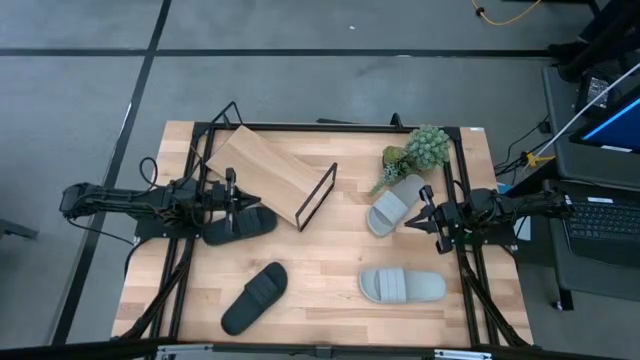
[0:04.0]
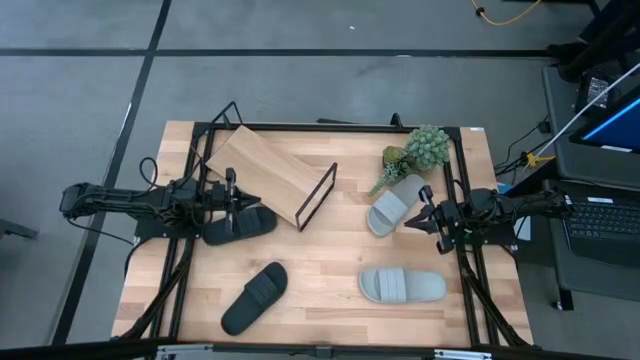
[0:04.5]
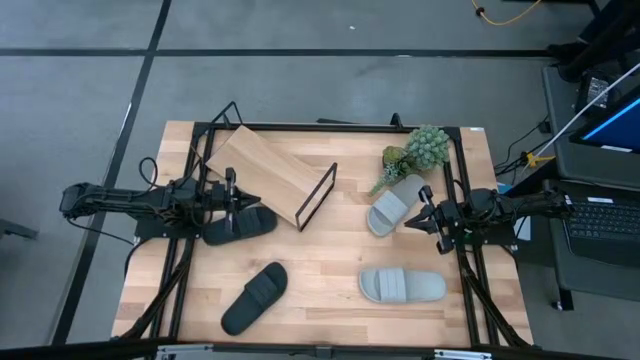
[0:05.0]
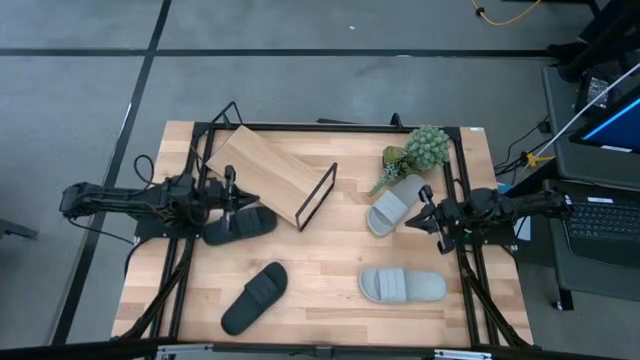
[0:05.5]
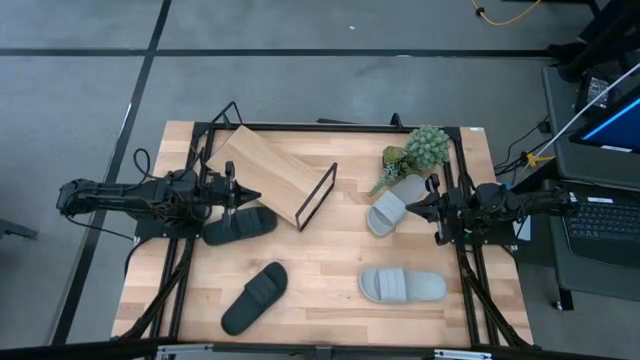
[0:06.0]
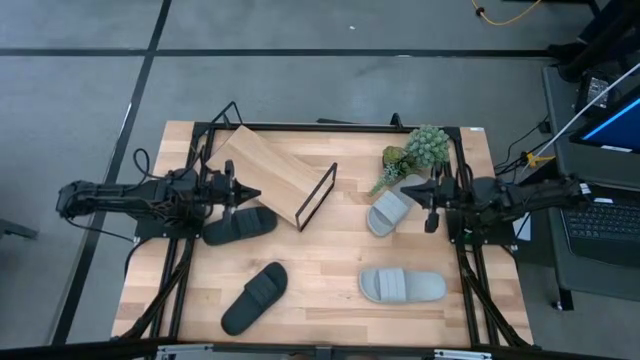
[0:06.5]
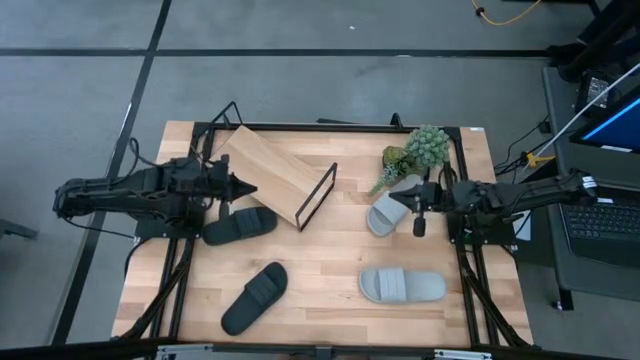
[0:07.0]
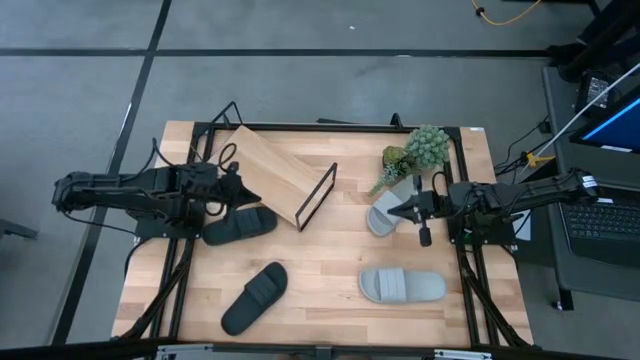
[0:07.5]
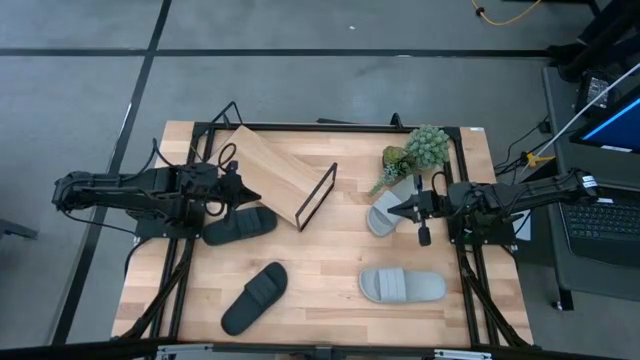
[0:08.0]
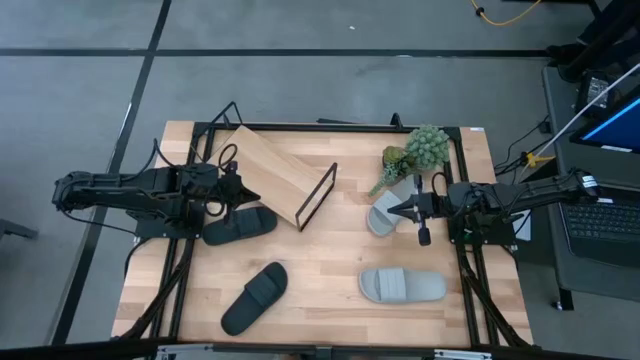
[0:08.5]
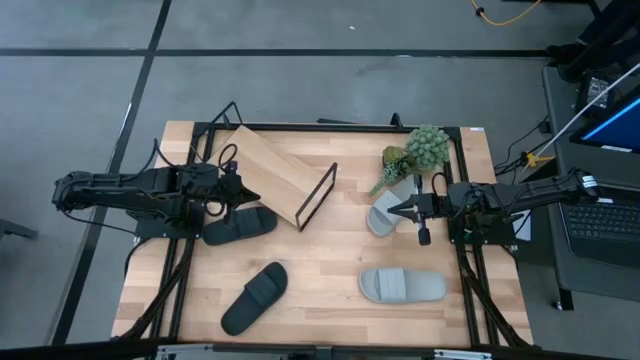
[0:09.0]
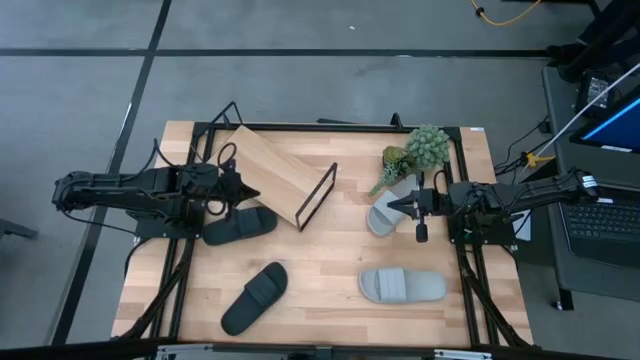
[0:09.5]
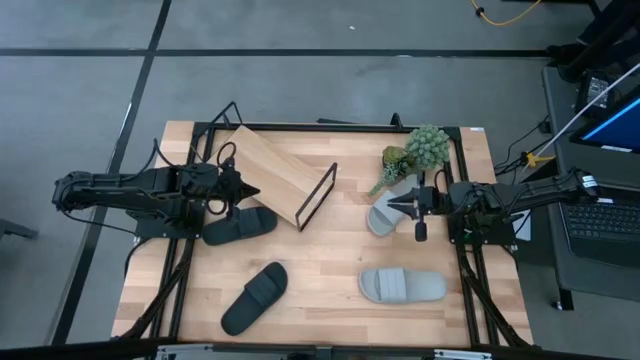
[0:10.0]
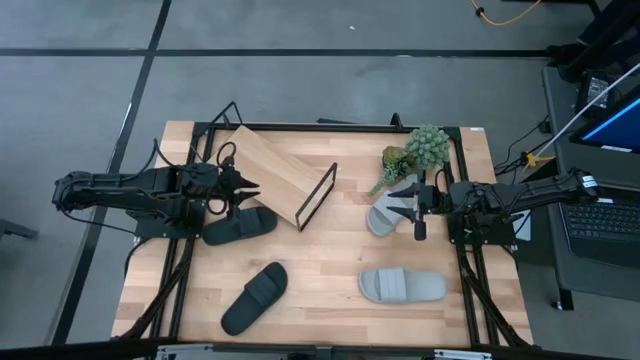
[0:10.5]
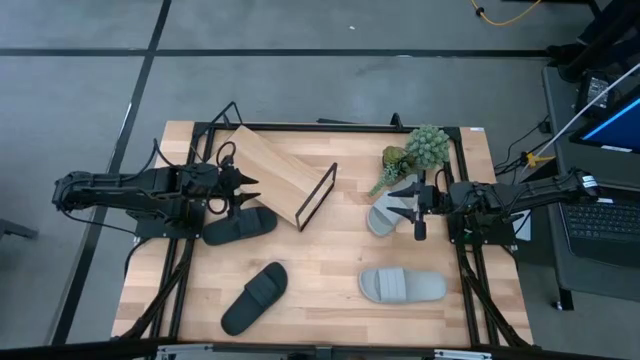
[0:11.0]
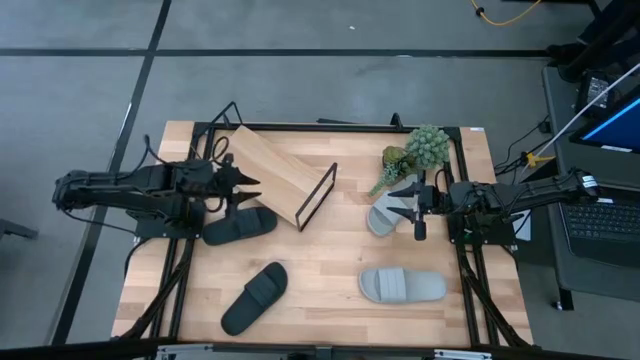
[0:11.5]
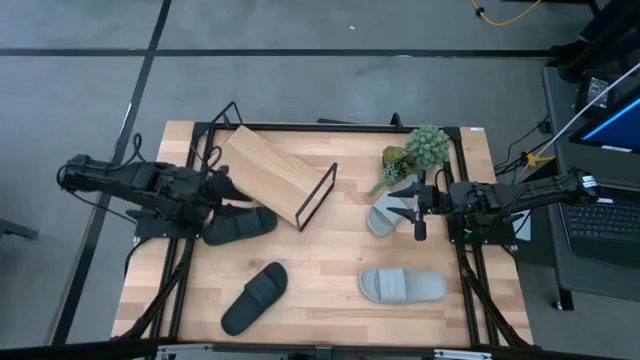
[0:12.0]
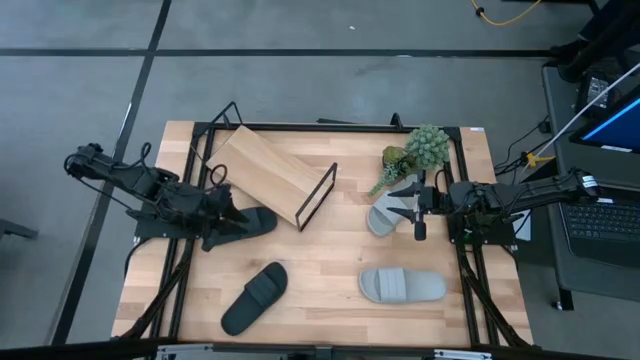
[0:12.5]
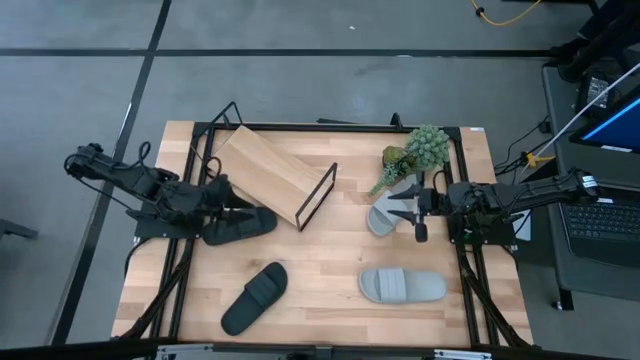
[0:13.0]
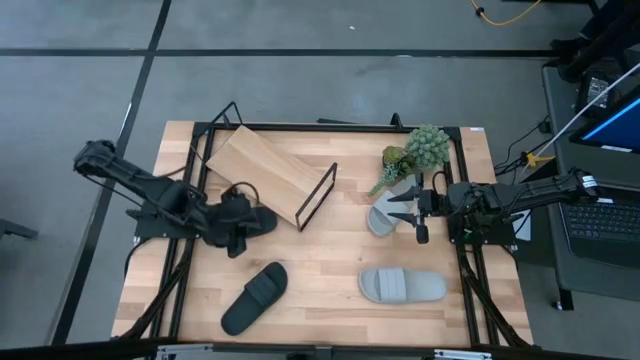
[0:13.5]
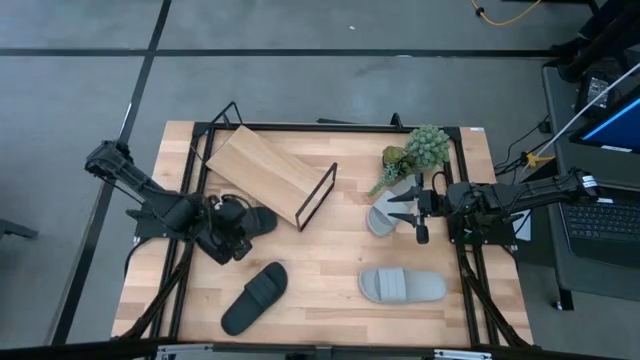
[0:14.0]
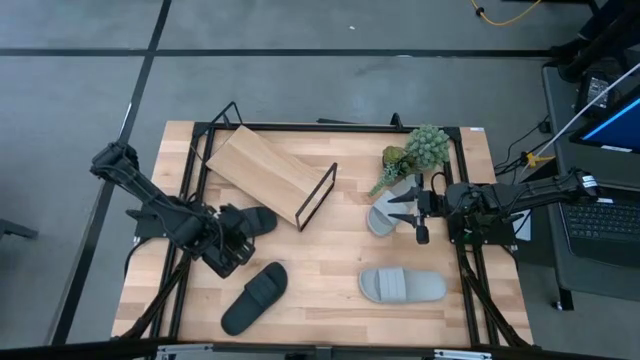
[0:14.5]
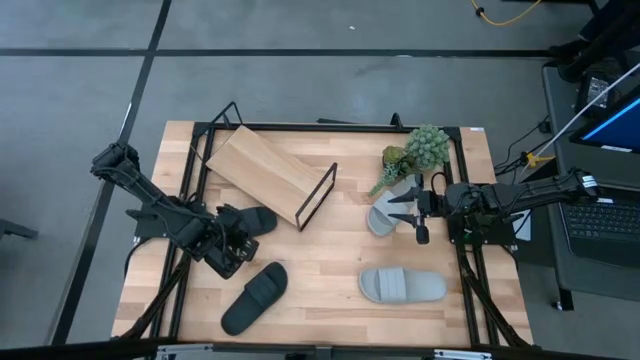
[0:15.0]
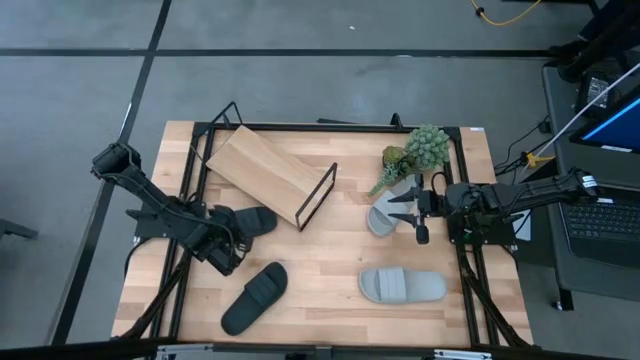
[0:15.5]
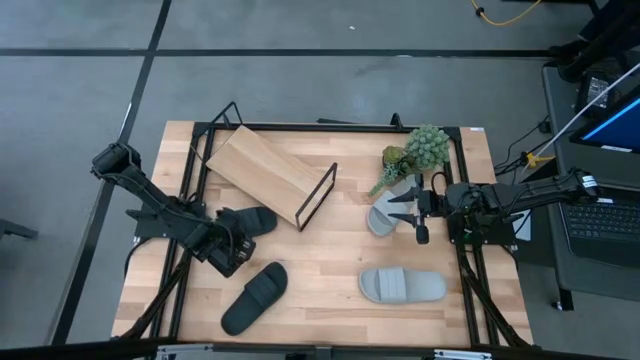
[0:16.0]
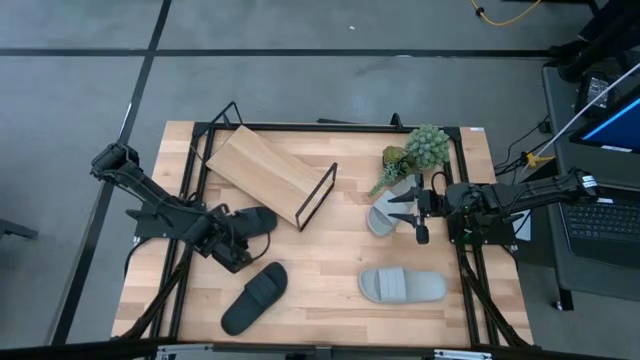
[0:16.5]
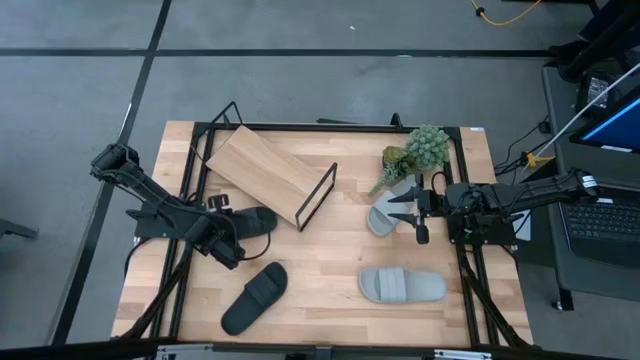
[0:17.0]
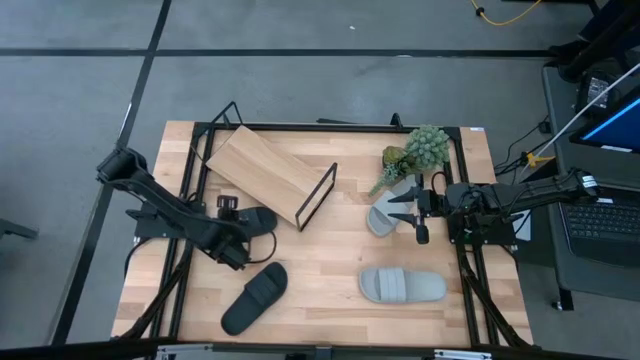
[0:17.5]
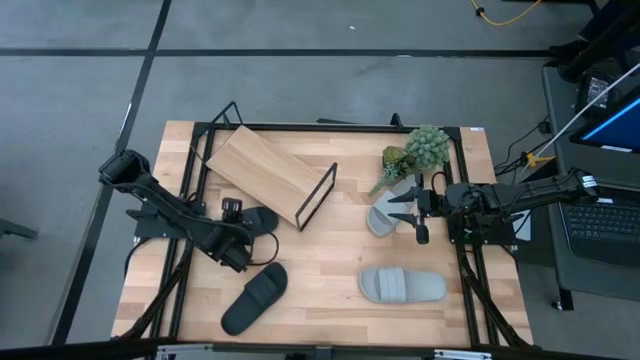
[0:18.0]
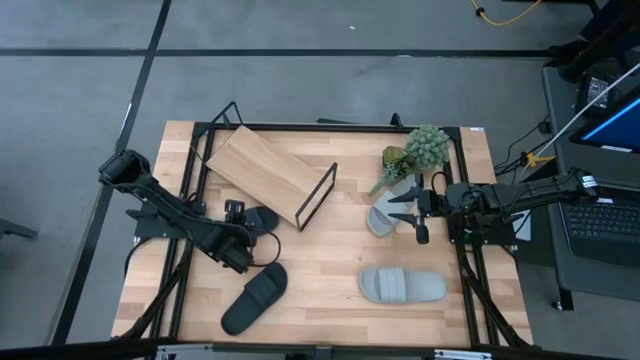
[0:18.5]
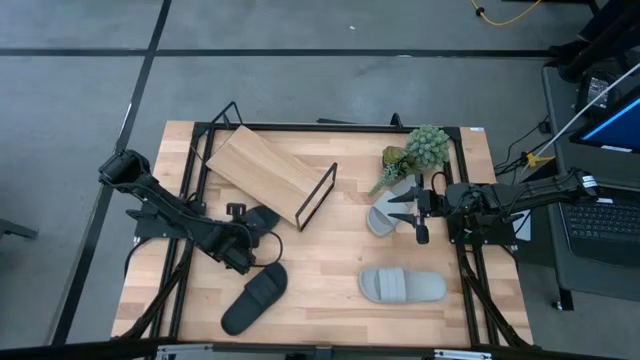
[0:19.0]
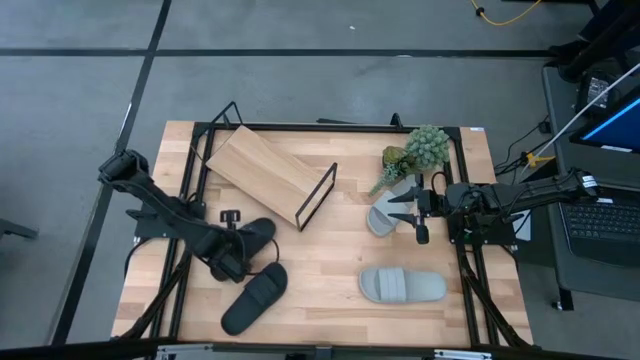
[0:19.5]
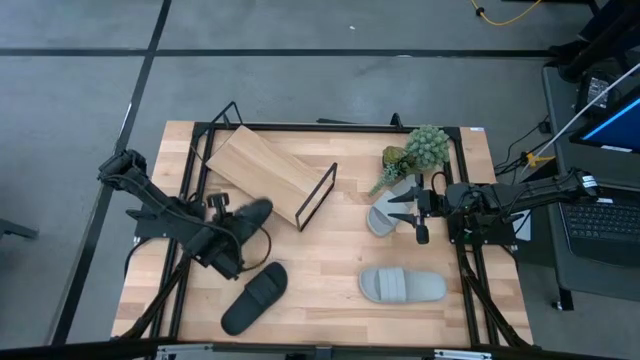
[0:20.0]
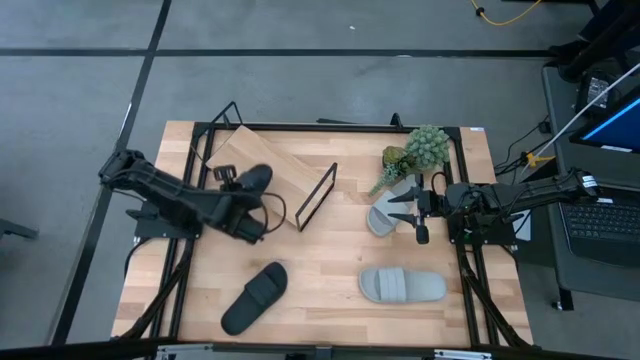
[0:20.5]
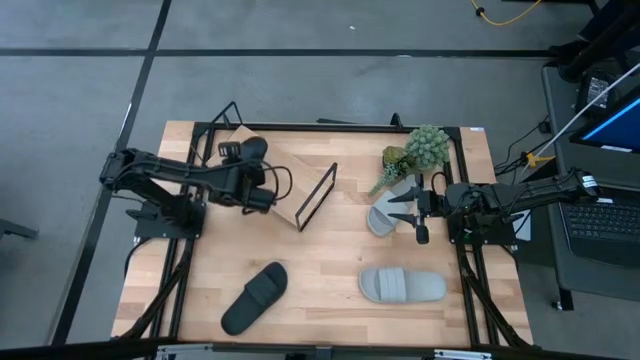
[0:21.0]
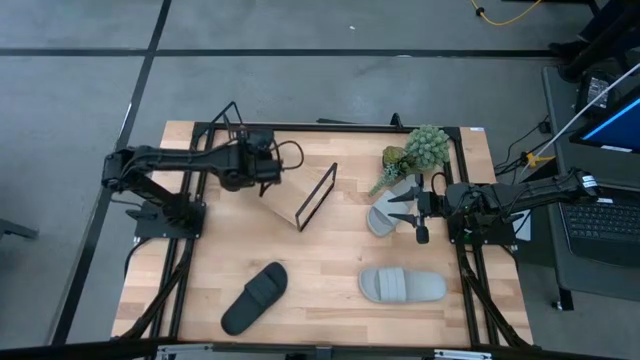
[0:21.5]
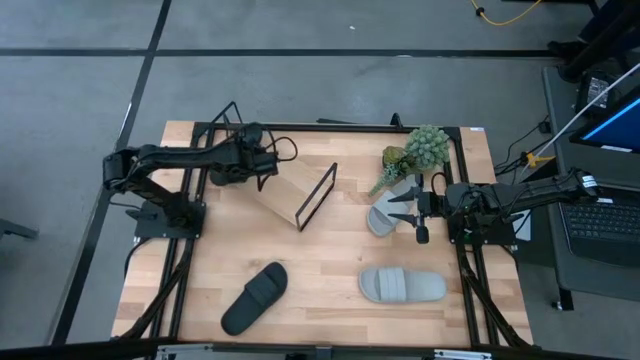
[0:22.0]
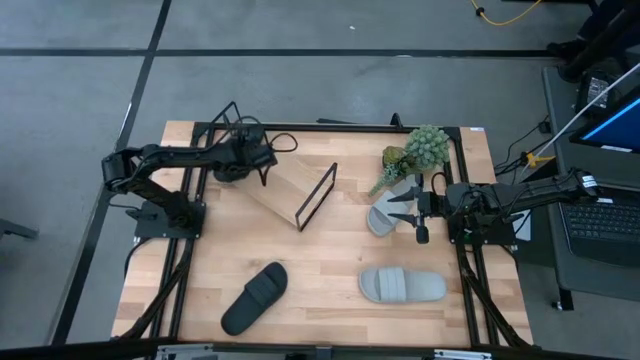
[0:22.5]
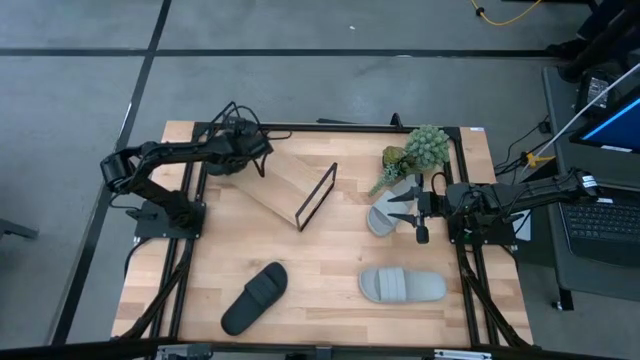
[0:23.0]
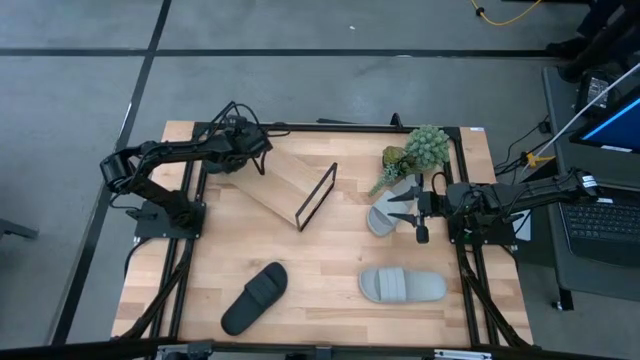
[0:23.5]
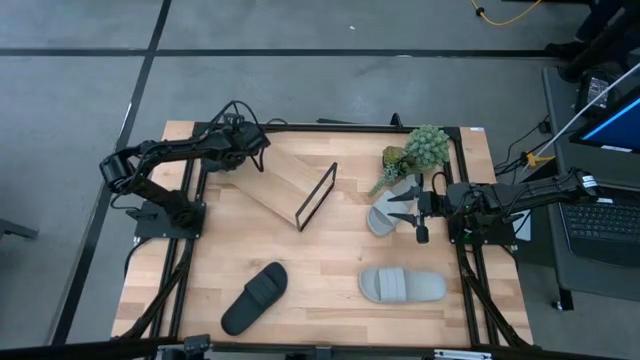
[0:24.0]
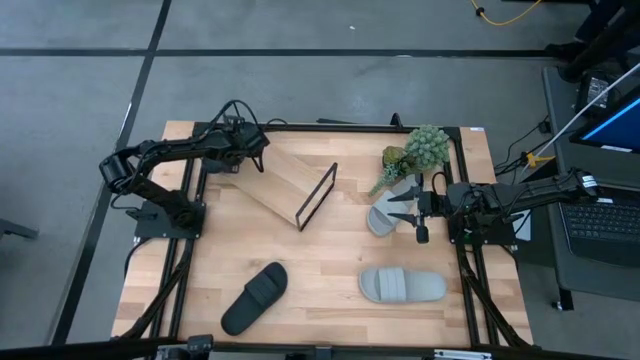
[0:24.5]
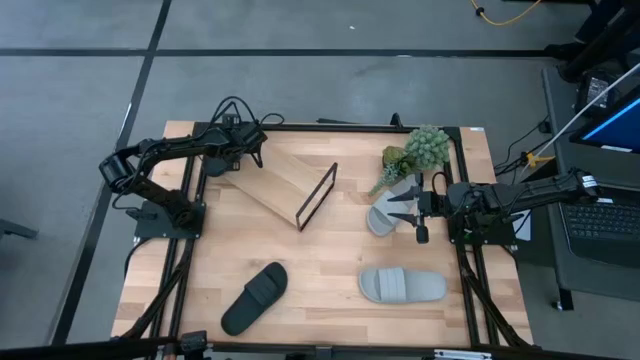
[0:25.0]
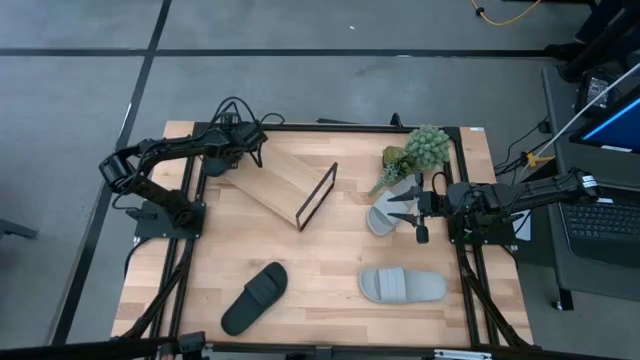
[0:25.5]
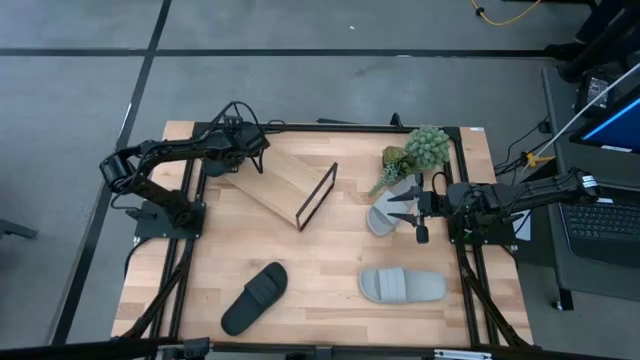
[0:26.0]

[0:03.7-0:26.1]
Task: Pick and place slides into the shelf
Put the top black slipper on the shelf
